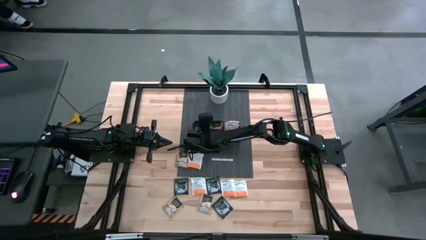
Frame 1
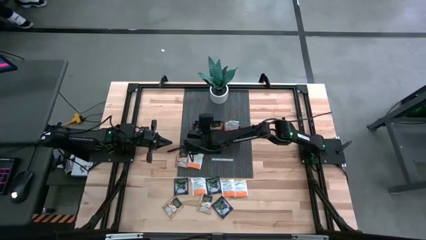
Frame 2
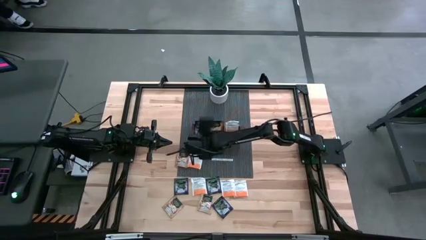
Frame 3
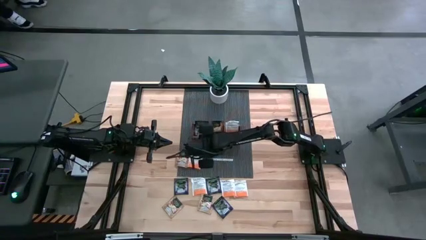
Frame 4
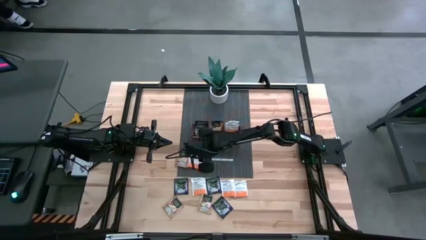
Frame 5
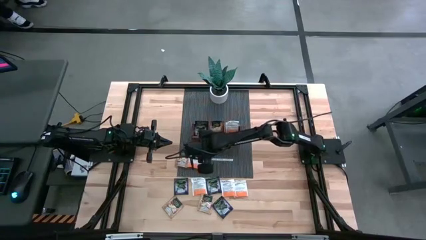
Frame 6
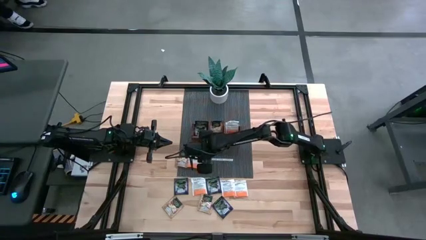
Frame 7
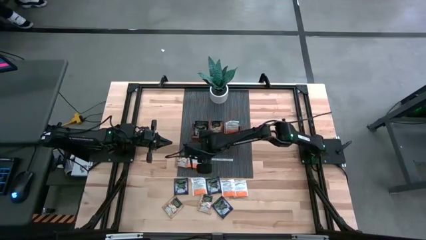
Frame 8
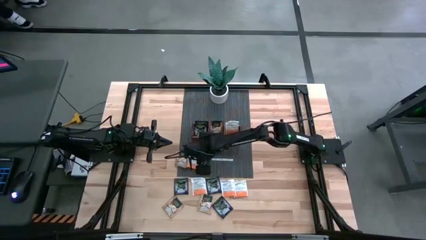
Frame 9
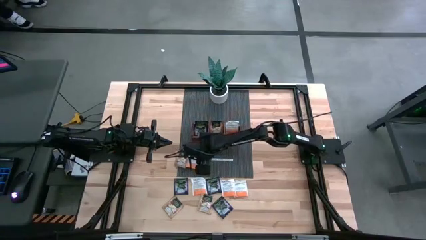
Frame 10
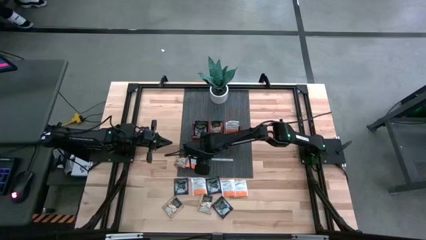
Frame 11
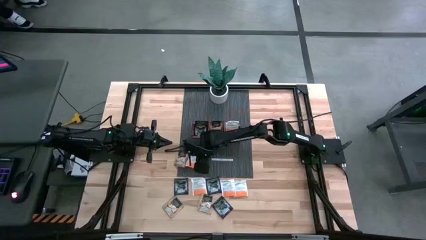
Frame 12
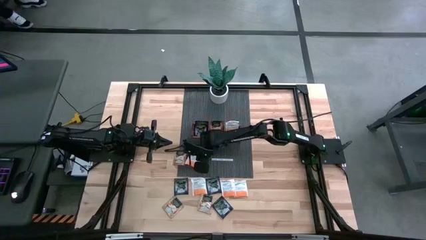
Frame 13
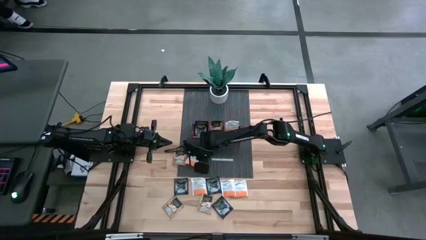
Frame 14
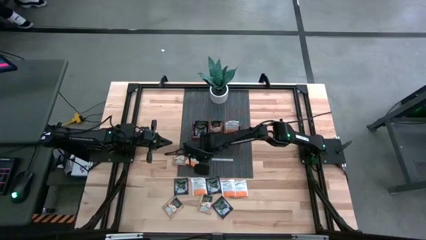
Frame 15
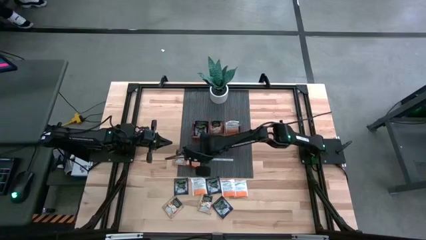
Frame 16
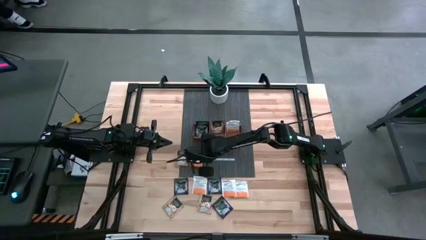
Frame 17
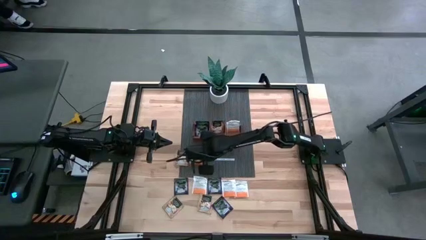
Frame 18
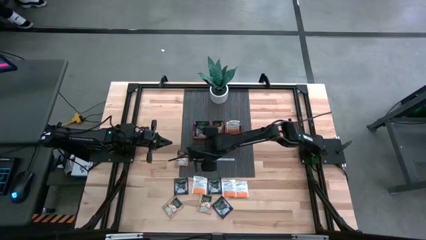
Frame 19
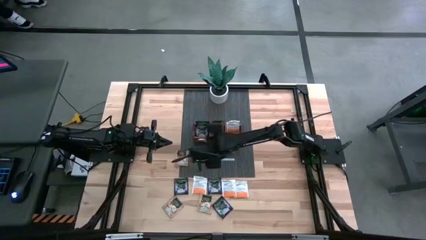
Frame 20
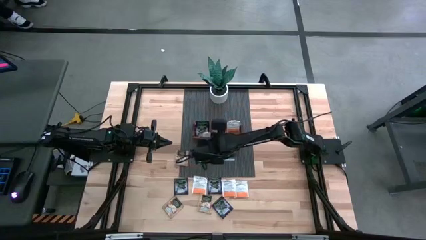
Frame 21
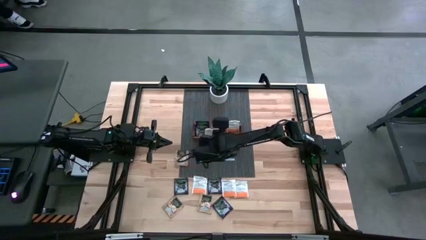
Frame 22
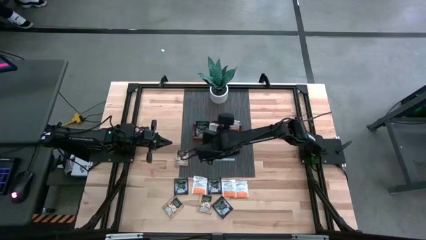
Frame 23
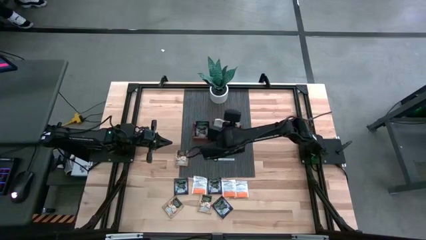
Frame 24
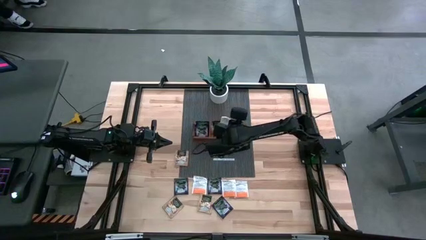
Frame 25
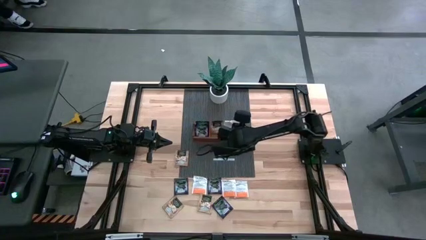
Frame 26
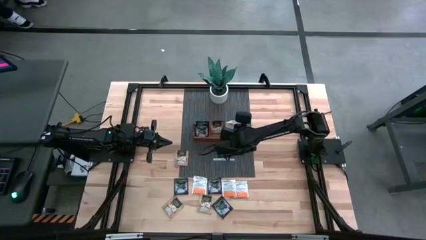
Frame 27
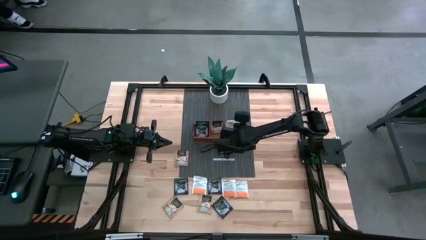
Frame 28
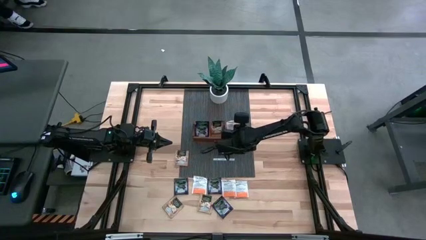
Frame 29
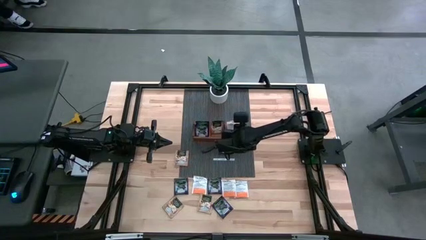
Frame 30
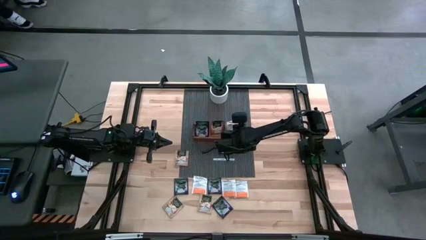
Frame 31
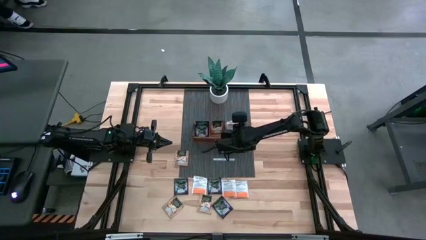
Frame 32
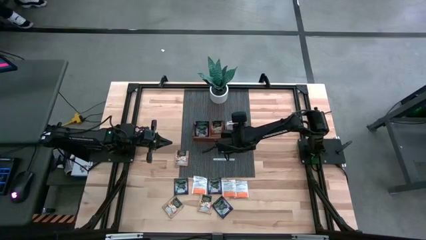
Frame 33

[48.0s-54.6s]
Task: Pick & Place Tea
Put the white tea bag into the right section of the wooden organizer

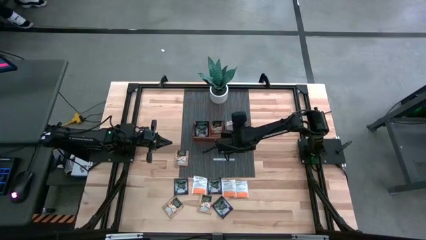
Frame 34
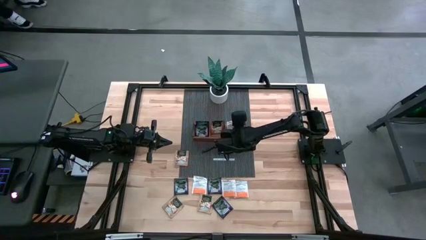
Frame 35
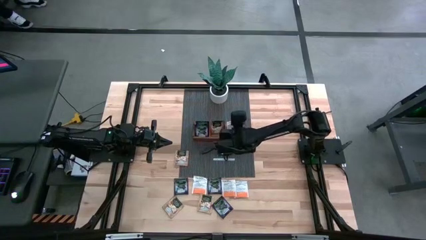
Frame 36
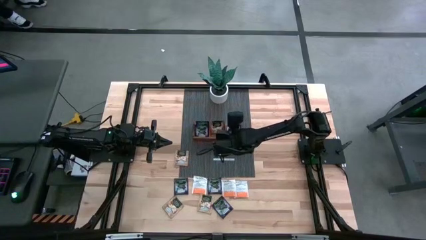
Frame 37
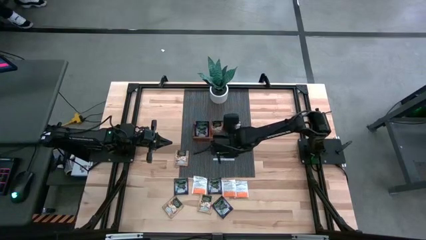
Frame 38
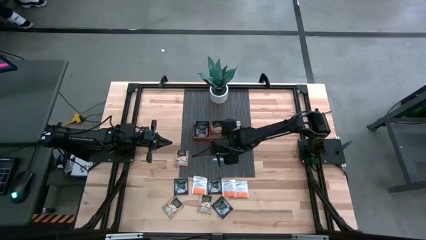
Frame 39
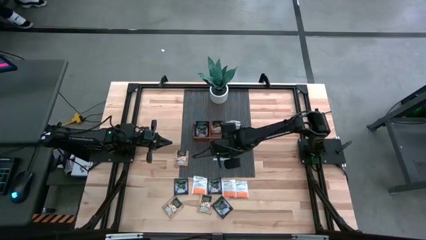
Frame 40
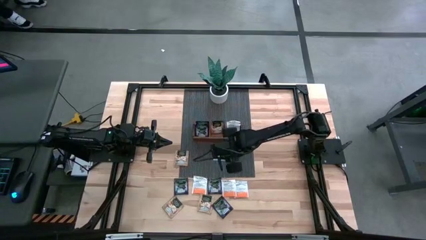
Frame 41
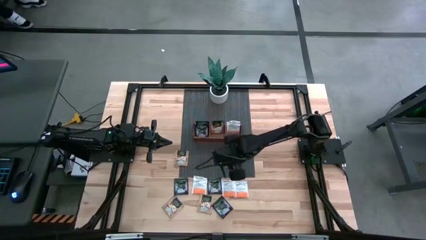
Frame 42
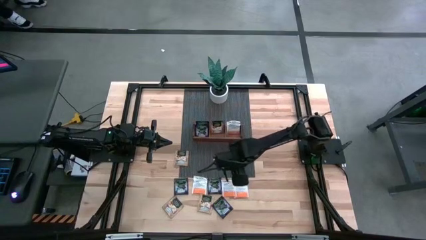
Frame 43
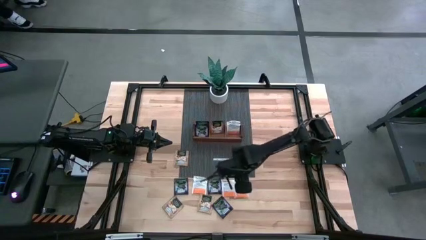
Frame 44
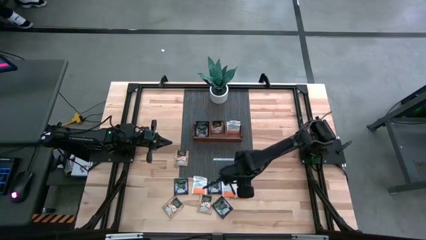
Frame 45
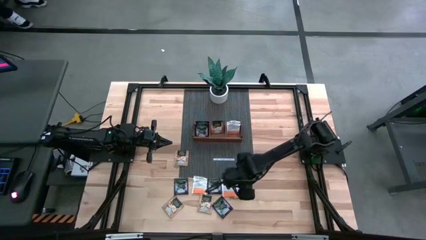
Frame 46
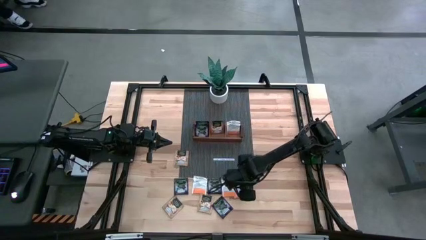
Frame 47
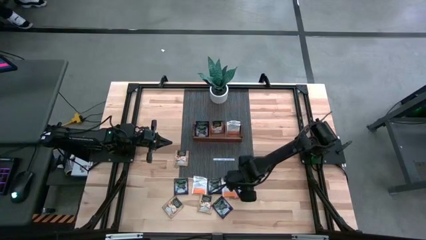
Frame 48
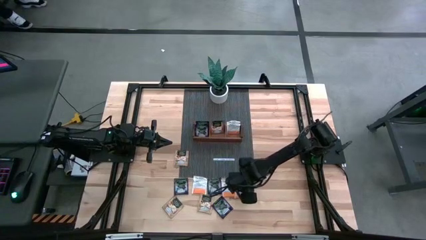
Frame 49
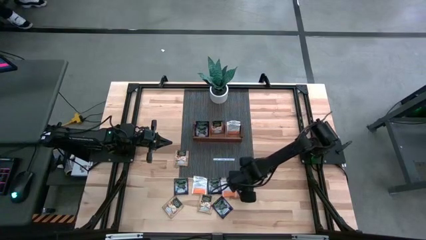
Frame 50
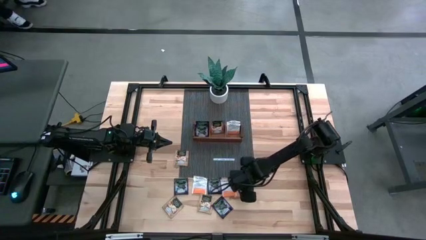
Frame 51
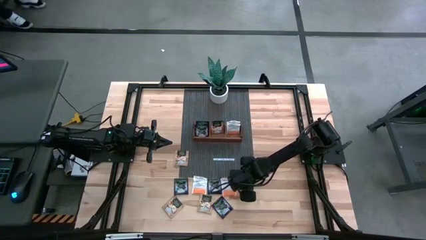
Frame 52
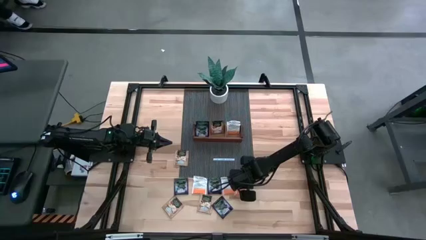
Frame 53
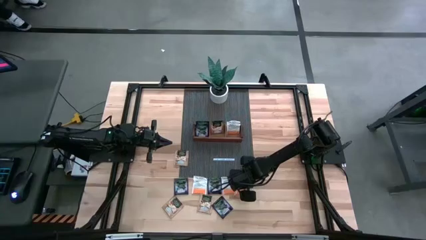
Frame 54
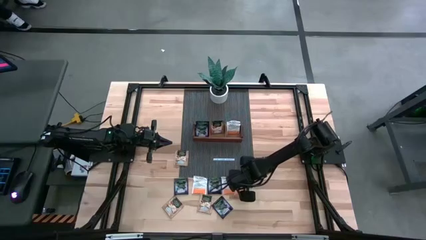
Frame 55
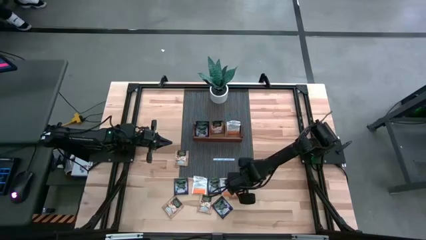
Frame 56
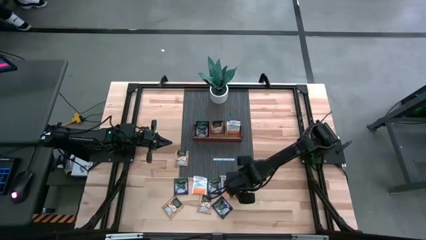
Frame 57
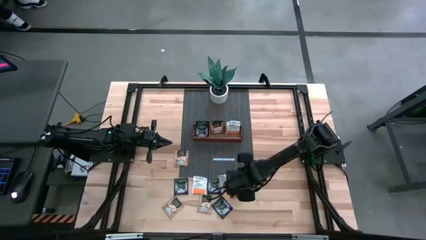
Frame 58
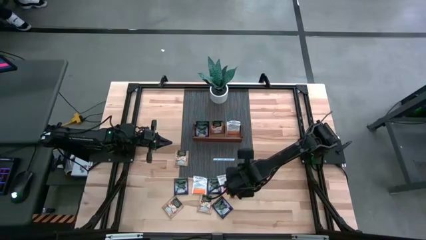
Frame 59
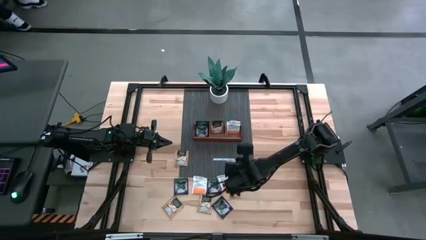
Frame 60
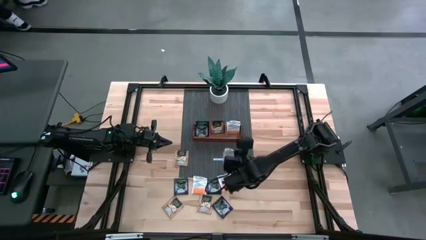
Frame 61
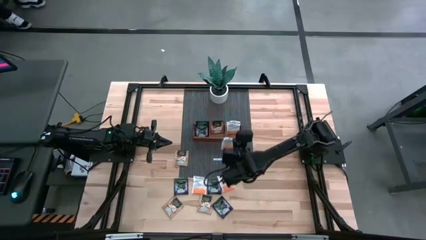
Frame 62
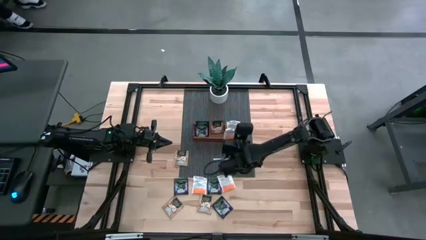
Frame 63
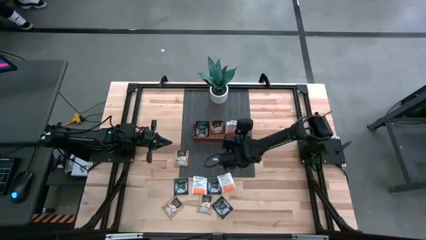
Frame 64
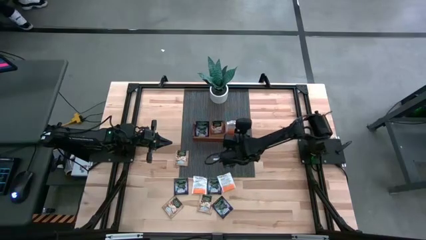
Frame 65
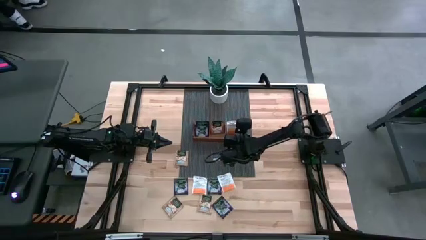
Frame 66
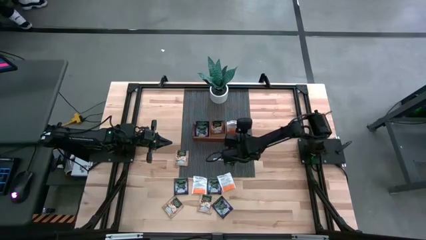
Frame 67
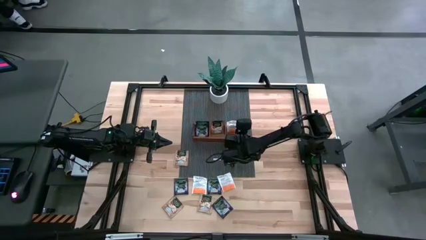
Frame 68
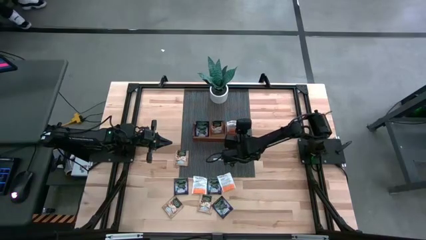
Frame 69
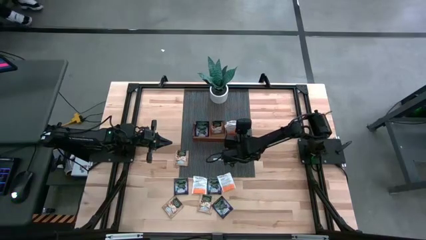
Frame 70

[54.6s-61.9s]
Put the white tea bag into the right section of the wooden organizer
